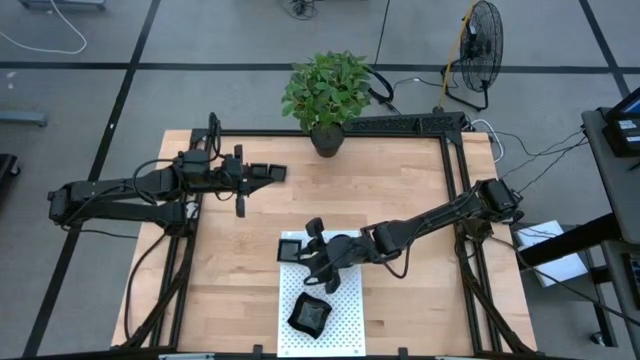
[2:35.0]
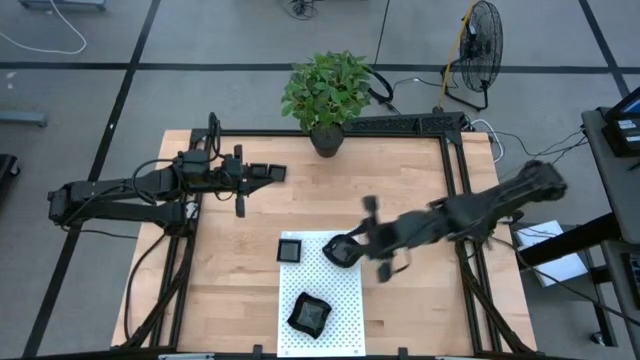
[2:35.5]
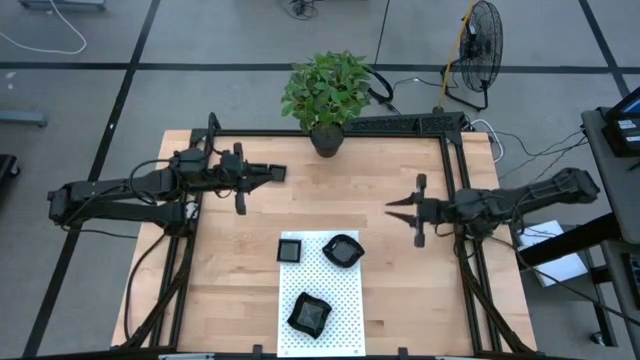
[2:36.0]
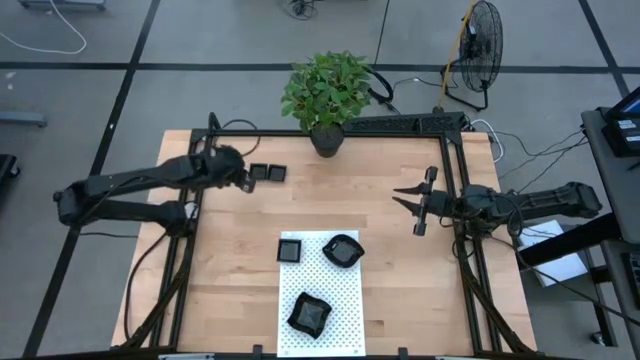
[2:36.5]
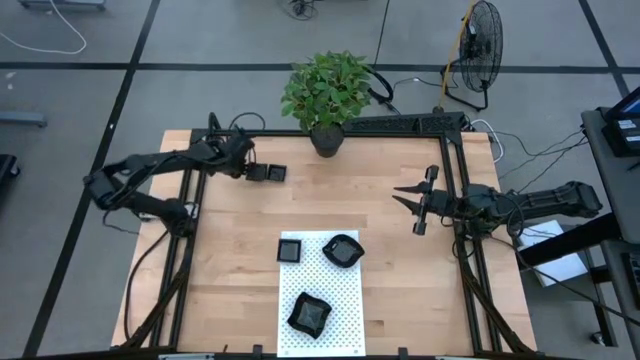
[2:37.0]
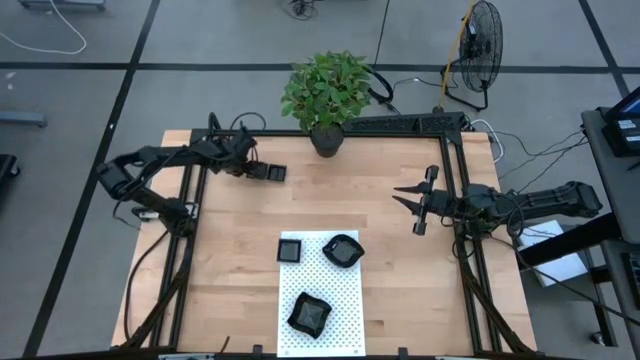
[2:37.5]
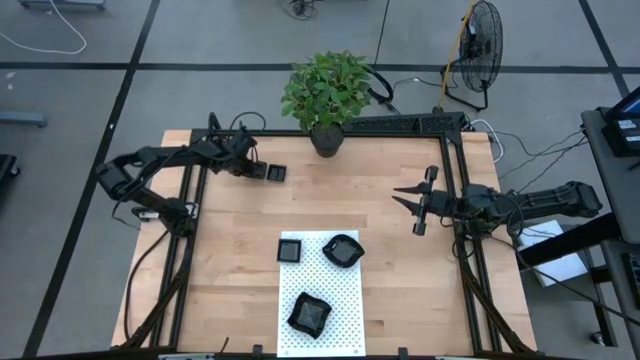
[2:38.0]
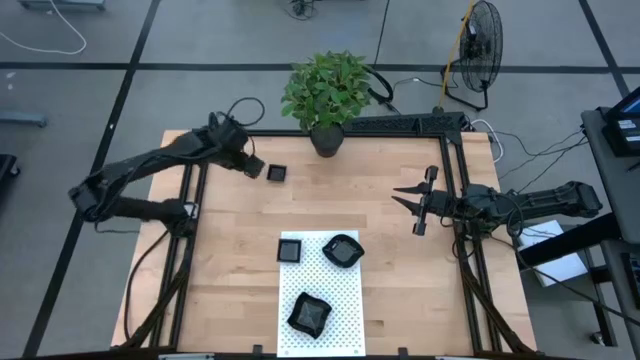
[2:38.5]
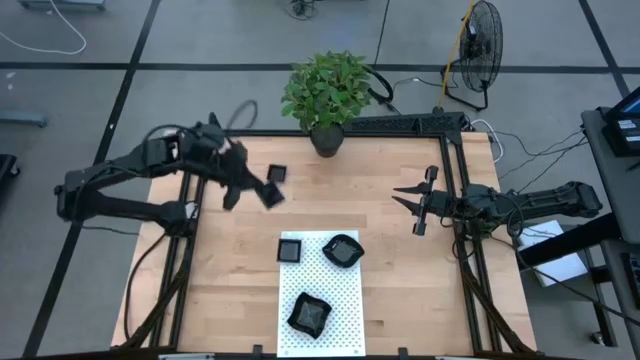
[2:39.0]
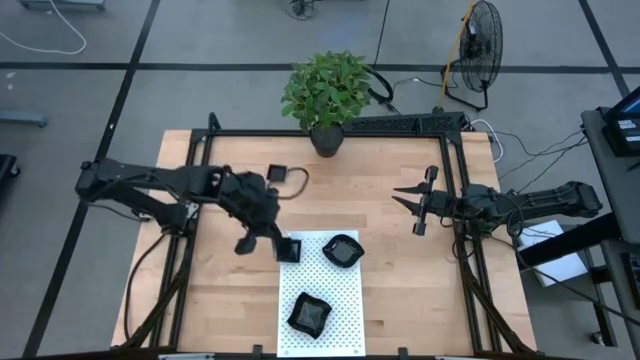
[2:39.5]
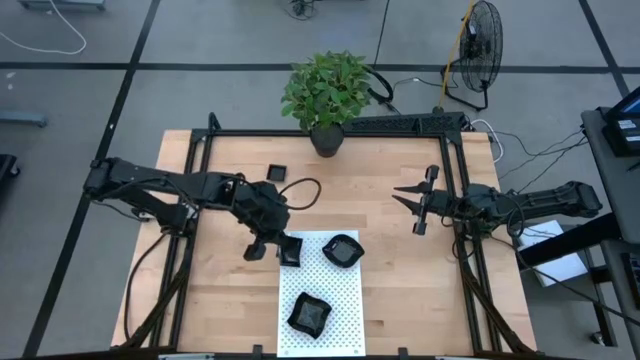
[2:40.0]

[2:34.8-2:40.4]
Task: Pick & Place Mini shaped plates
Stack the left square plate on top of the square plate on the shelf

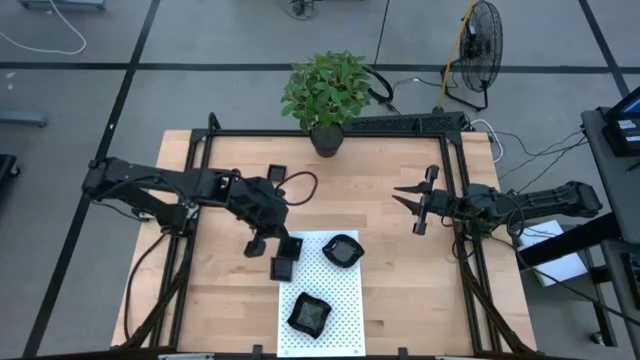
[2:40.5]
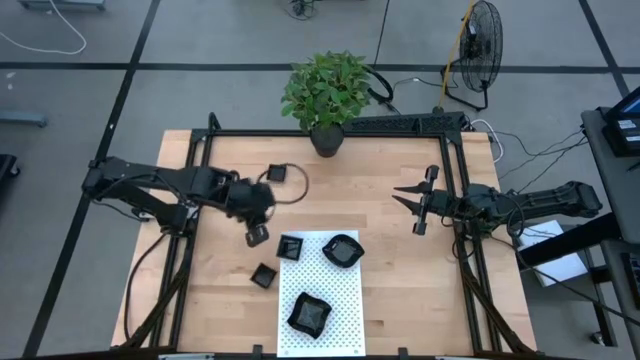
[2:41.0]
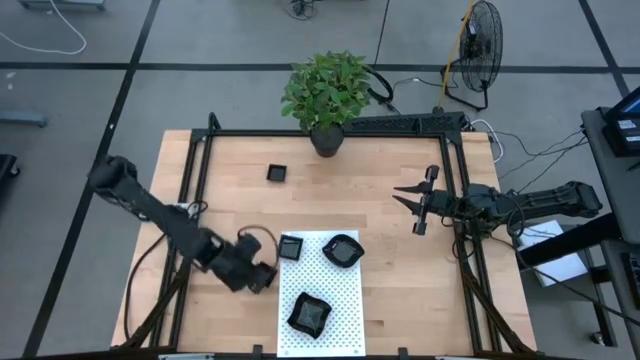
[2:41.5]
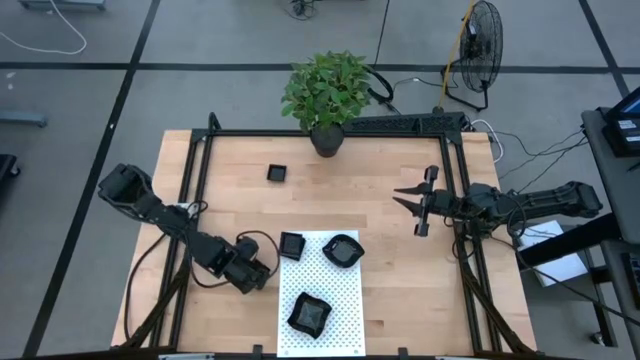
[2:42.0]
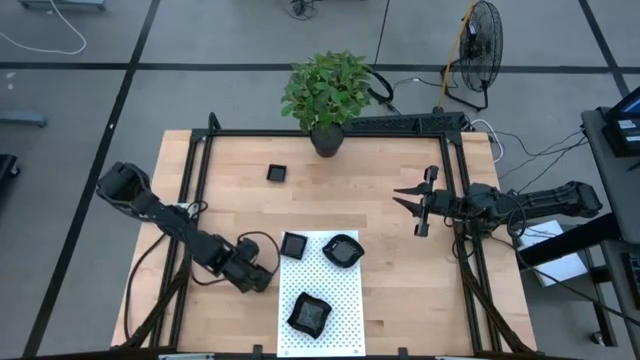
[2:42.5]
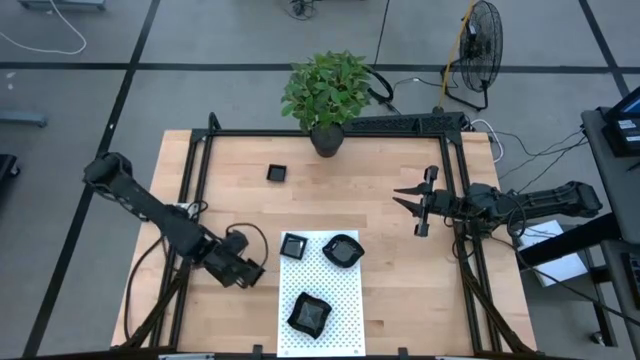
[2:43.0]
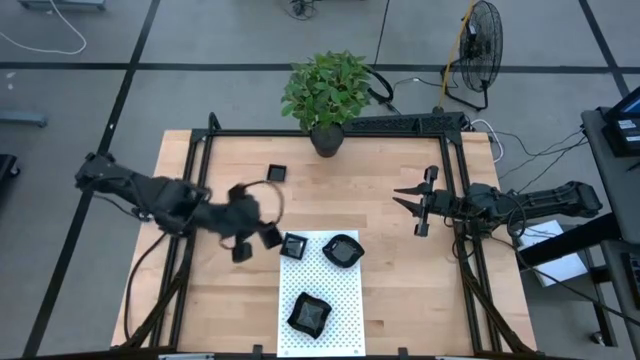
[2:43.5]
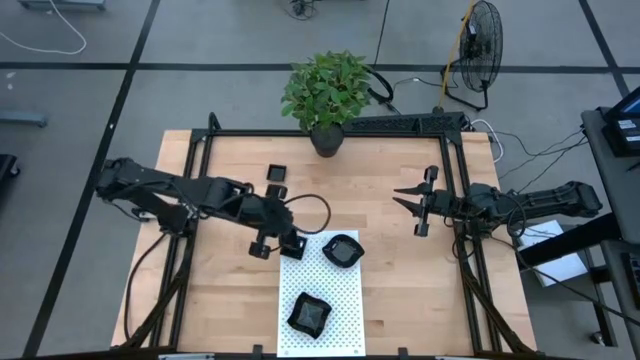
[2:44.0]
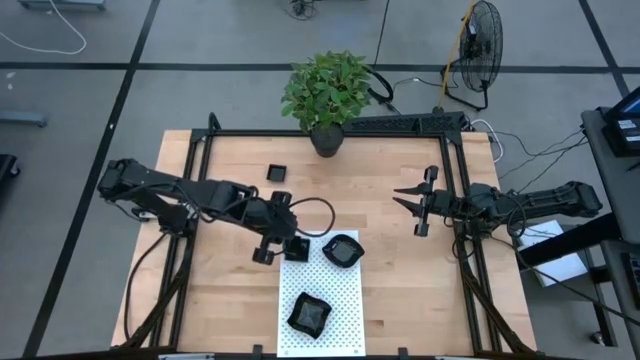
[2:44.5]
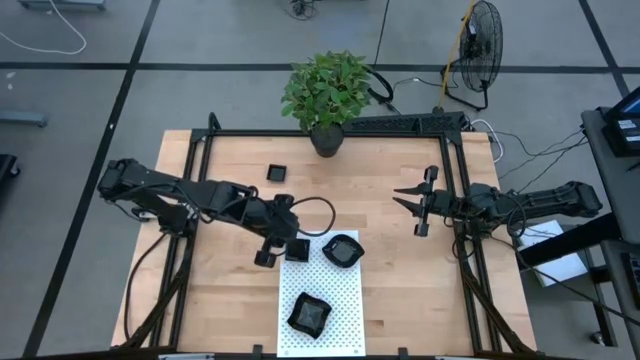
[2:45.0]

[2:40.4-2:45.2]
Stack the bottom square plate on top of the square plate on the shelf

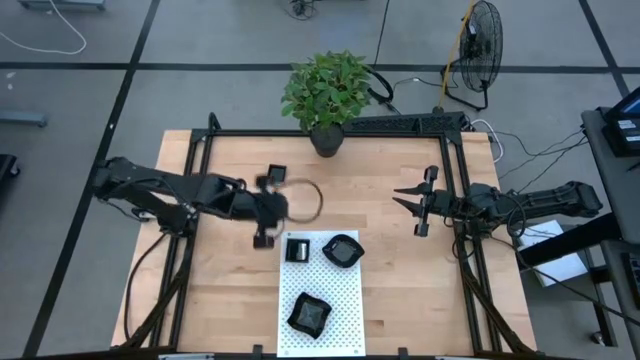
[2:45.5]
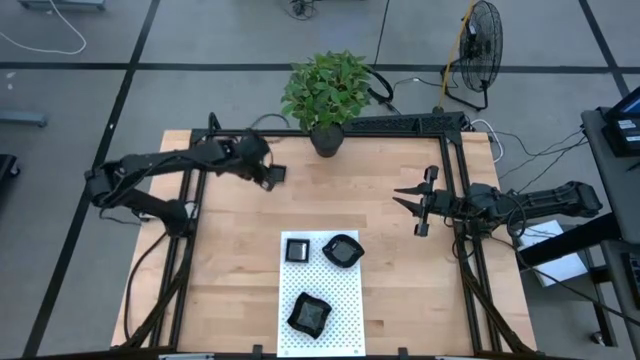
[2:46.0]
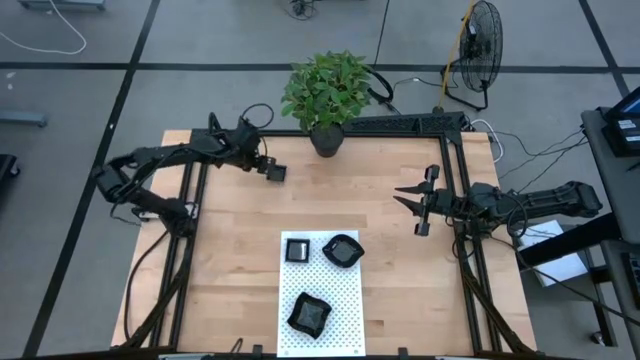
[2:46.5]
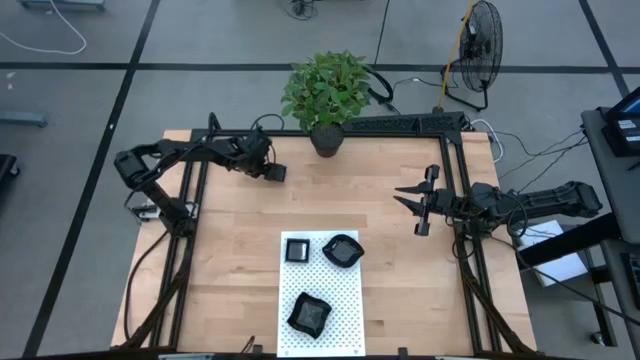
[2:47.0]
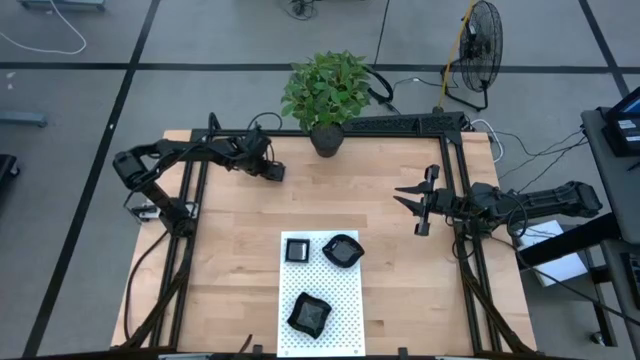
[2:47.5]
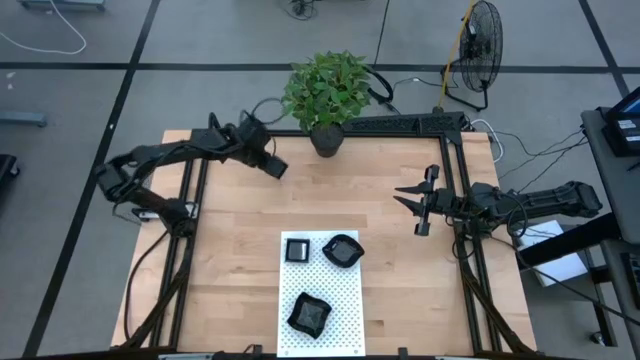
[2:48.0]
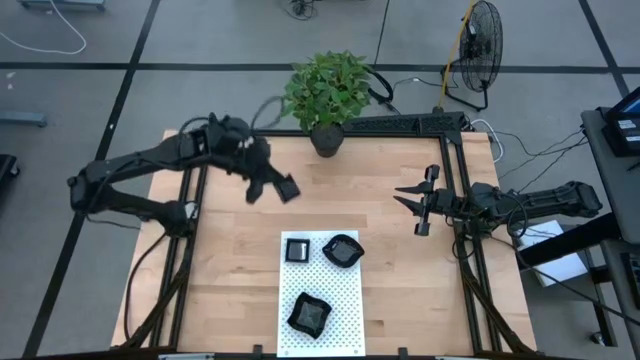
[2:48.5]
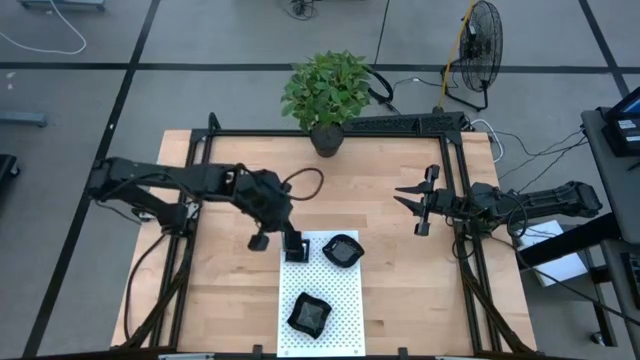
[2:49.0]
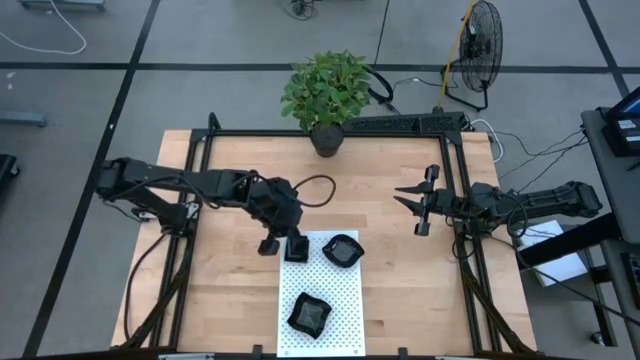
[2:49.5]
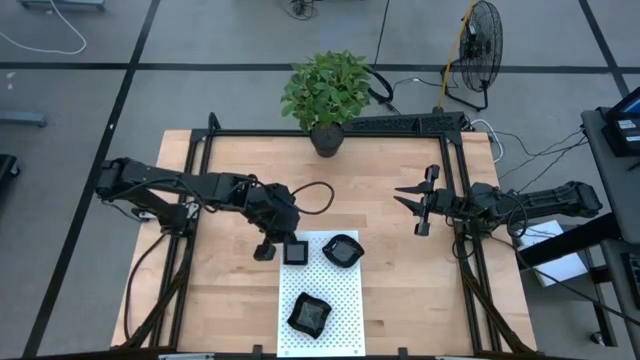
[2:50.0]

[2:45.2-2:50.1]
Stack the square plate on top of the square plate on the shelf

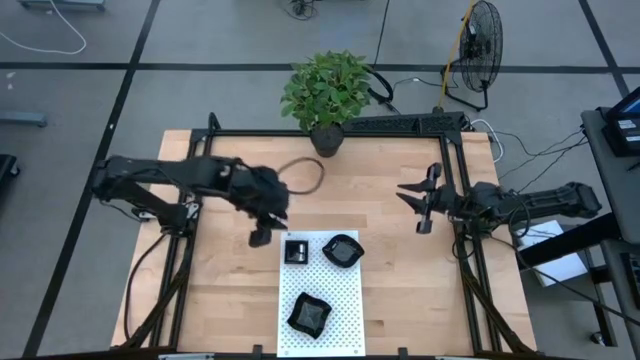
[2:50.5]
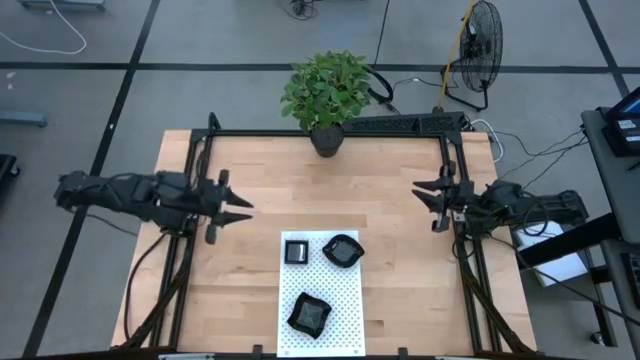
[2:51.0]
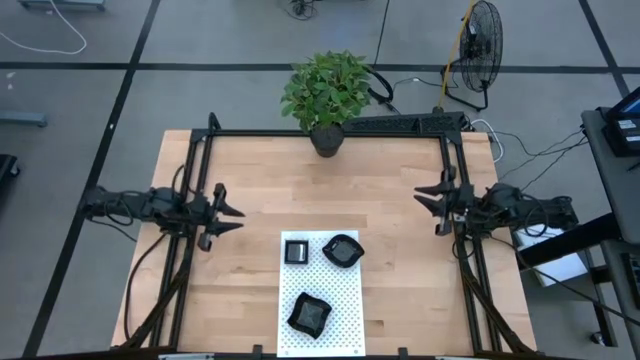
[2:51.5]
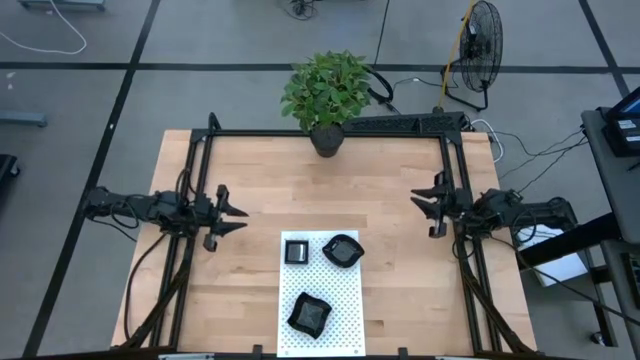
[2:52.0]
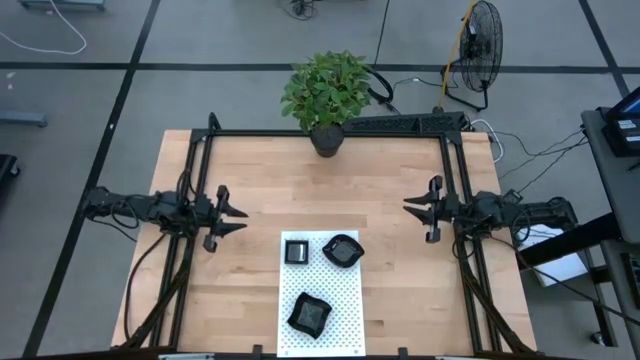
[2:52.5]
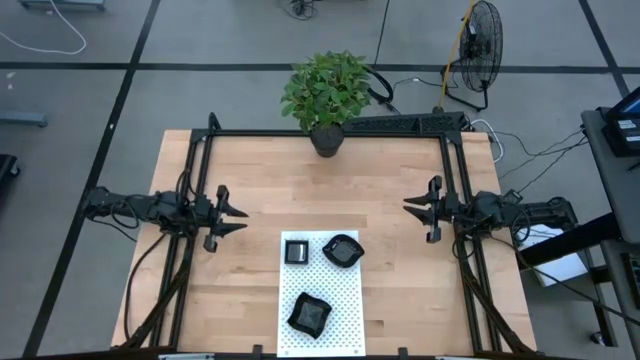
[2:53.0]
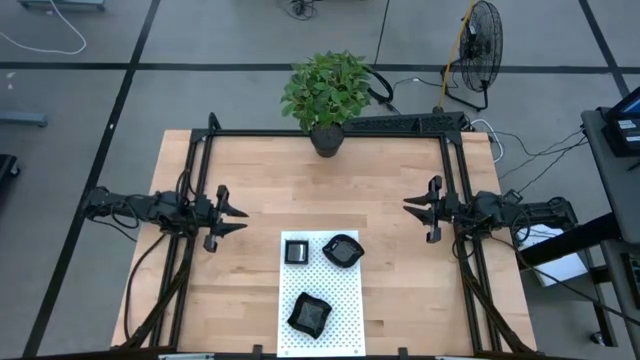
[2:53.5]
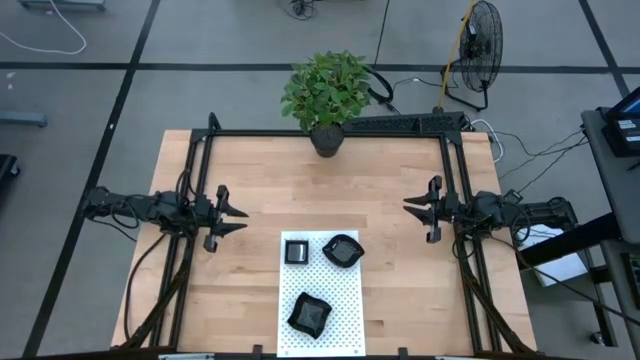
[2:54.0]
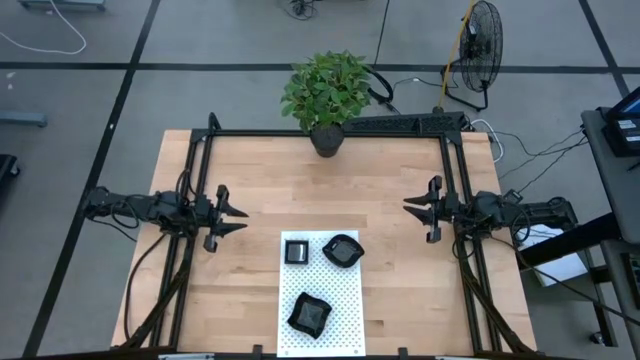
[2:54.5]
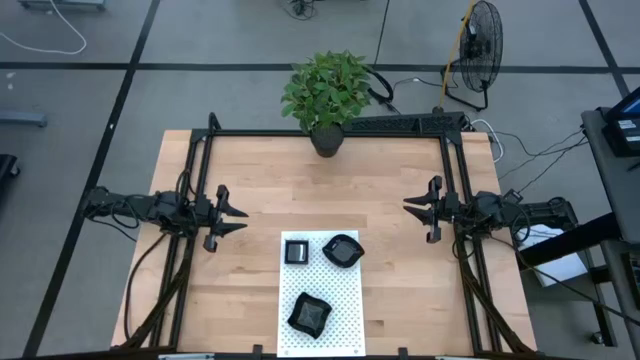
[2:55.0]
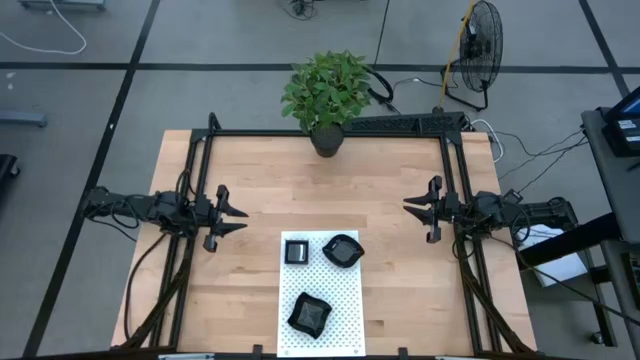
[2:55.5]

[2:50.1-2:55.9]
Return to Home Position
